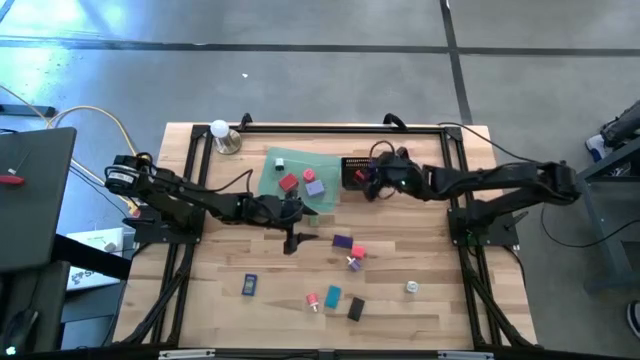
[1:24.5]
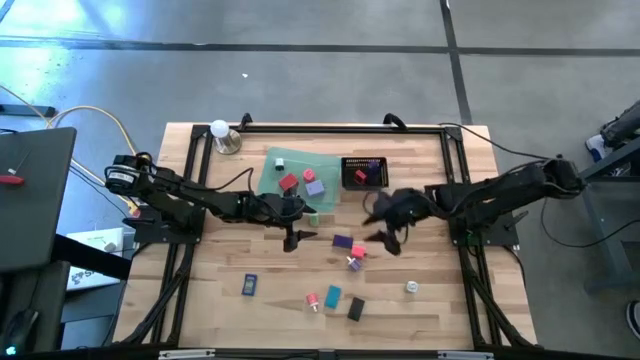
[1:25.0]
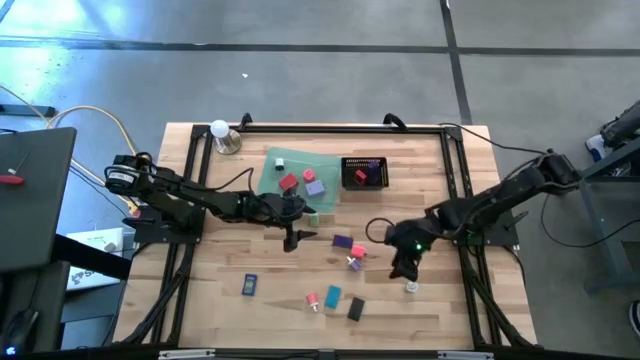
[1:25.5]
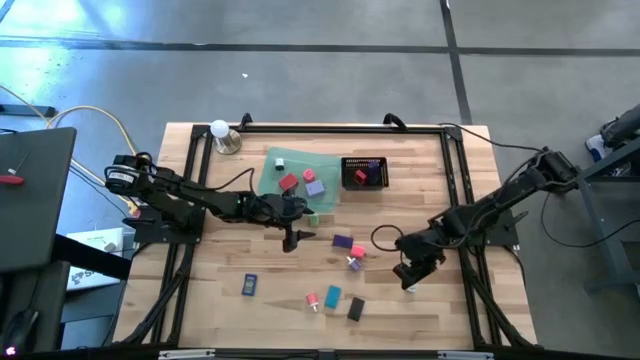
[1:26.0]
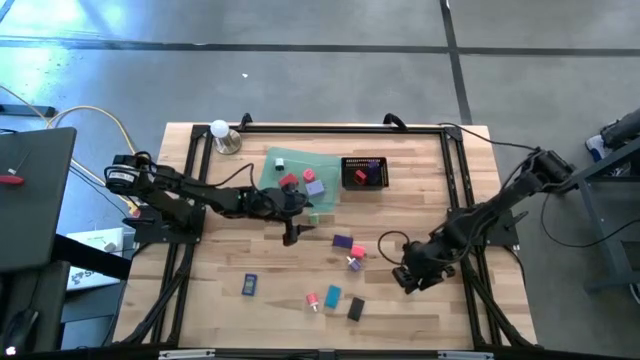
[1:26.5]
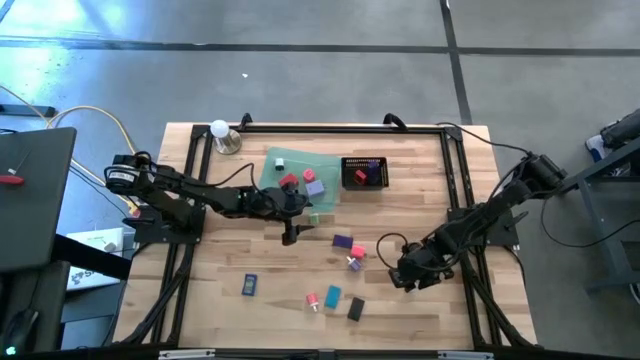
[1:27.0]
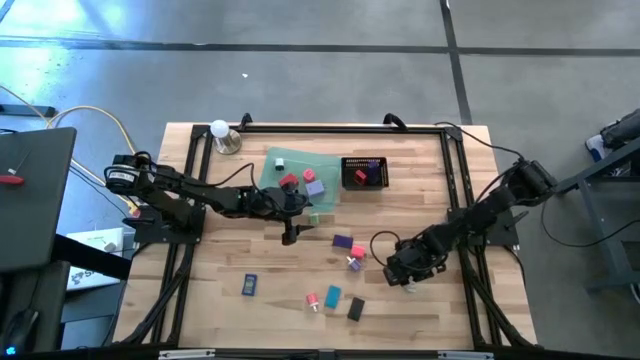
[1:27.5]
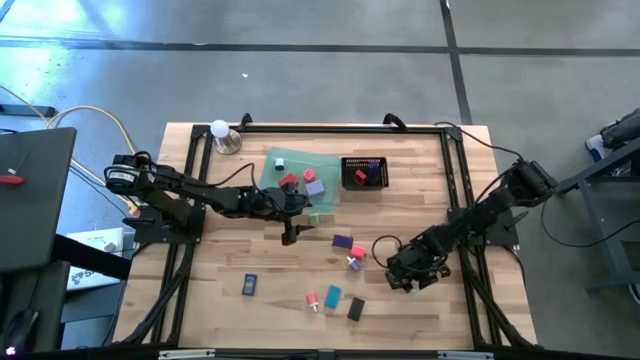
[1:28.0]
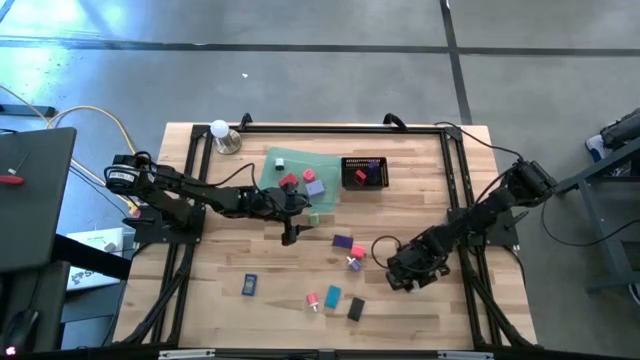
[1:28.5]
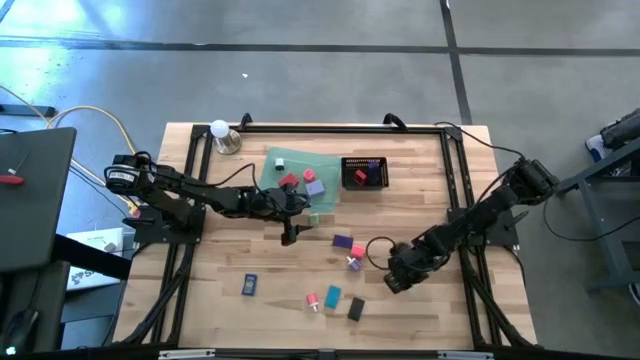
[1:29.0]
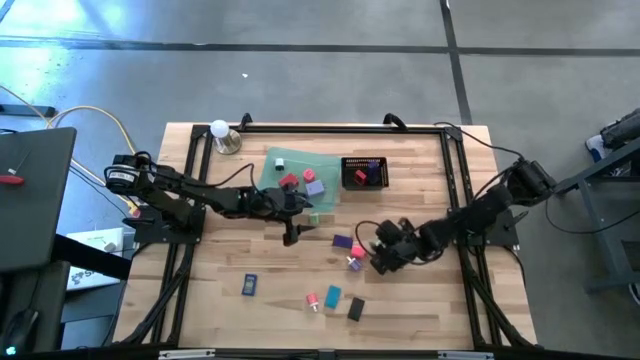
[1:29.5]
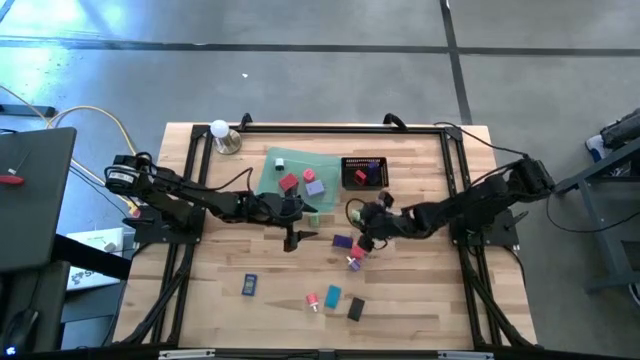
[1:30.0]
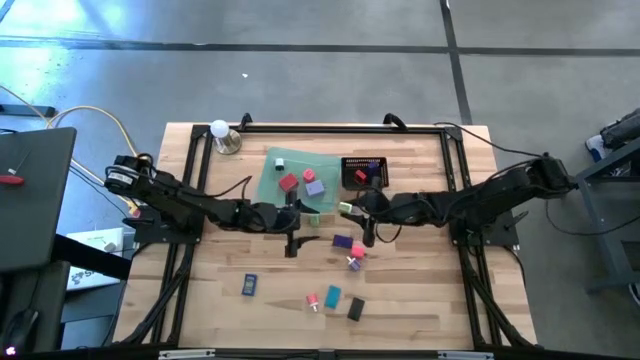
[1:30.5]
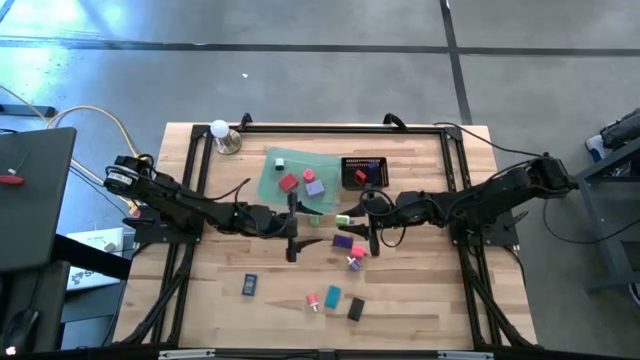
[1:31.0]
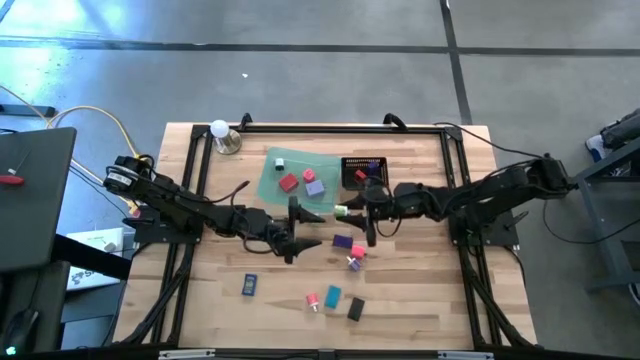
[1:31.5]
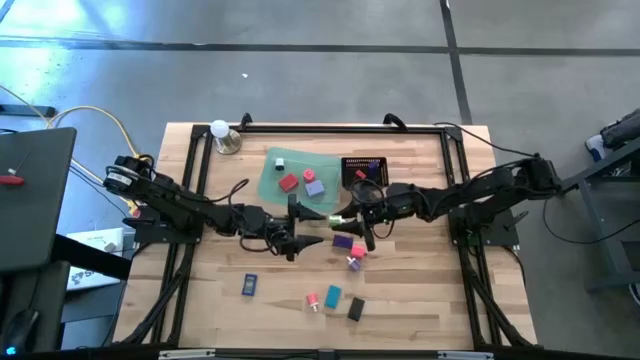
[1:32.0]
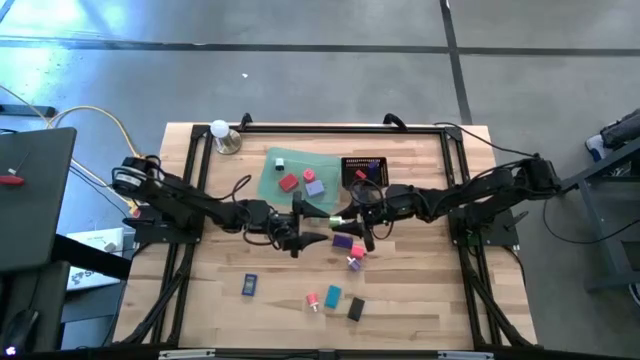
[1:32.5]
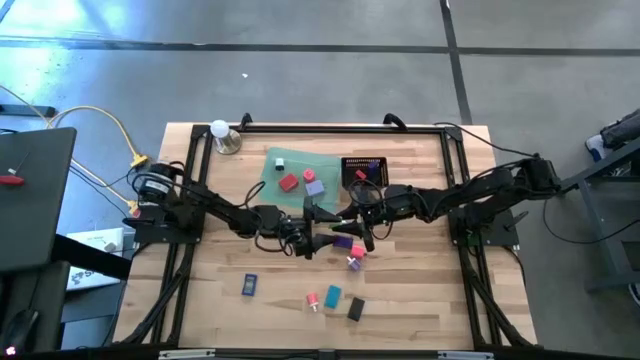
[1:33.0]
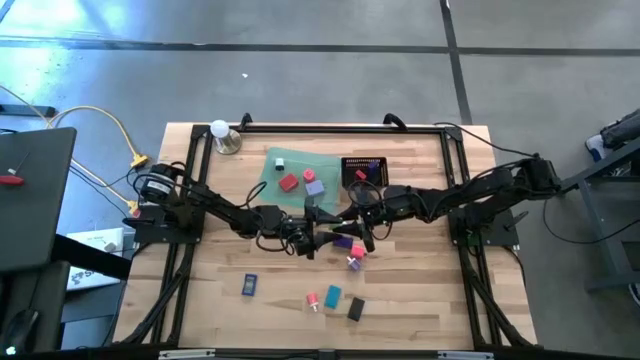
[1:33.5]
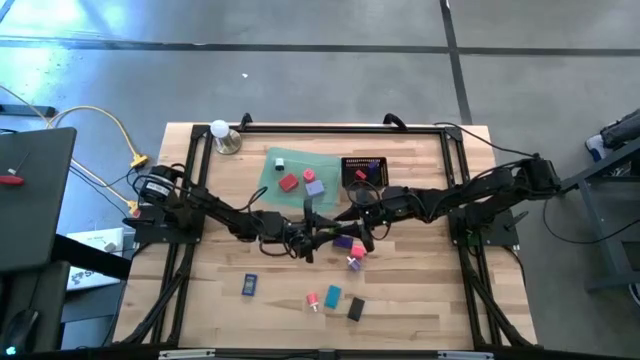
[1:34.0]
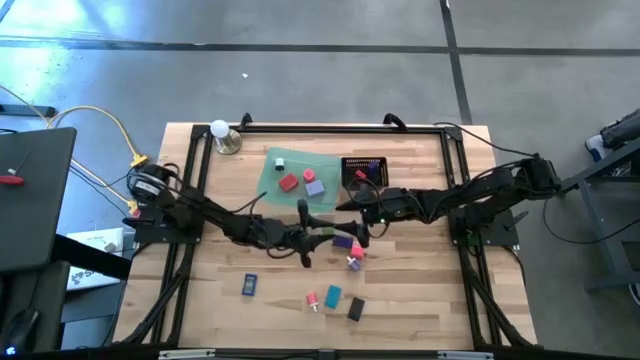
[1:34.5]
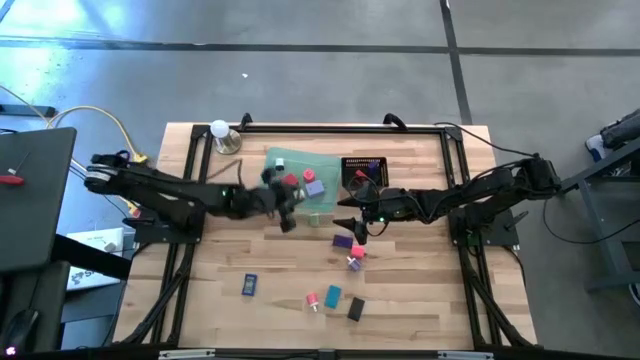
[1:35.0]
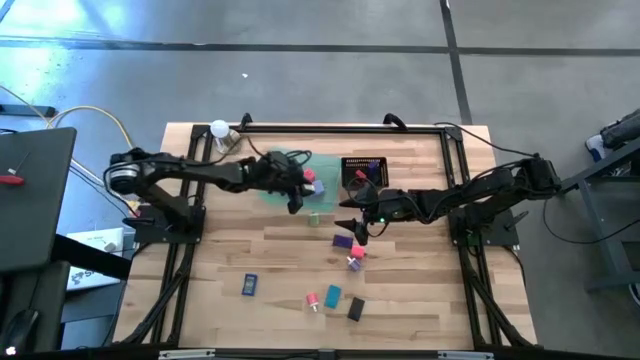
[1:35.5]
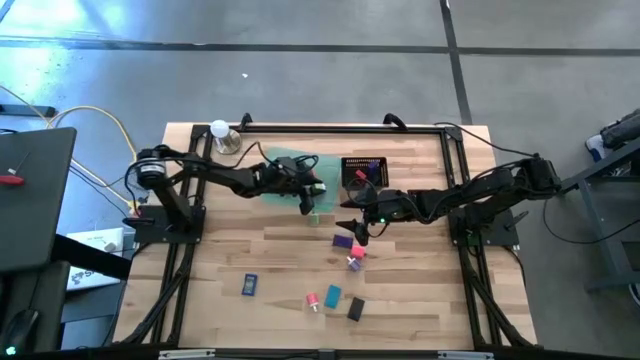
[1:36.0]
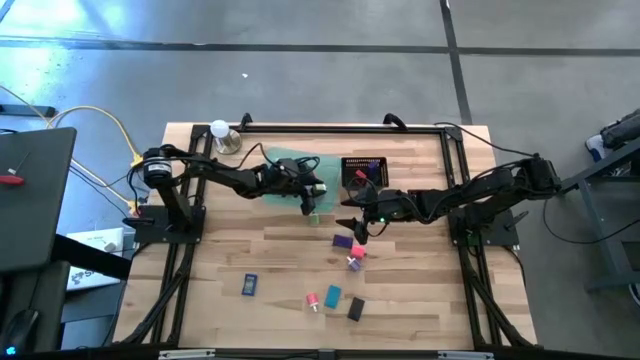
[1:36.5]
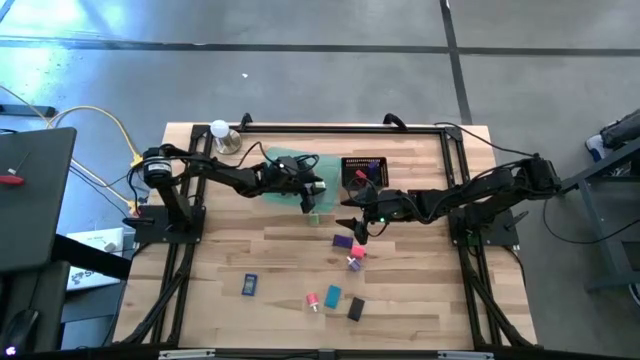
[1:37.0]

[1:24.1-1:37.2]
Task: Pick & Place Office items
Put the right green charger adapter into the green bin

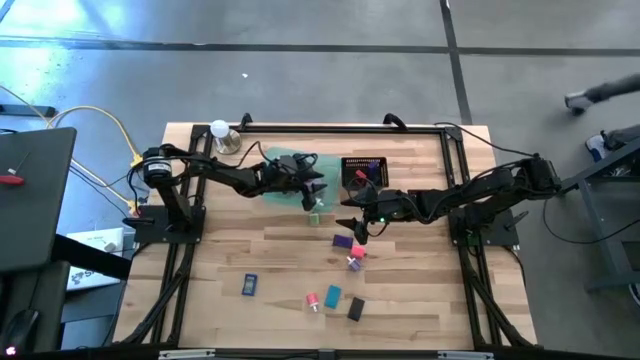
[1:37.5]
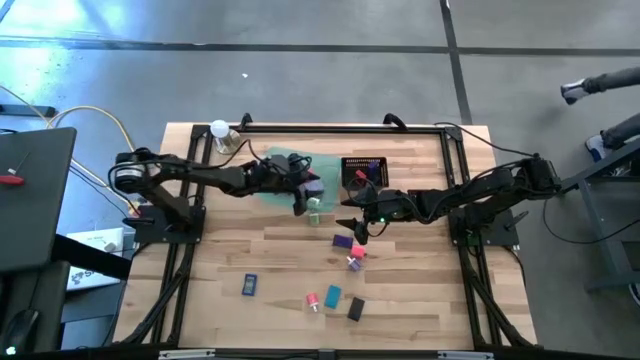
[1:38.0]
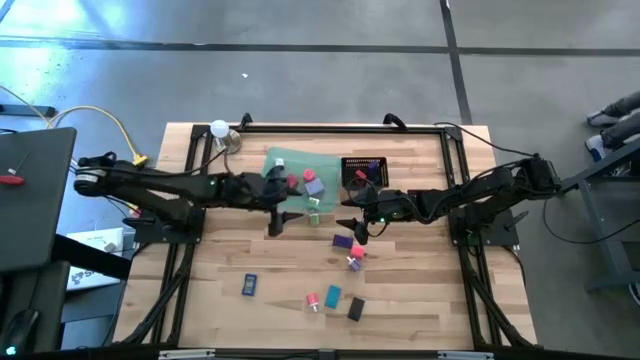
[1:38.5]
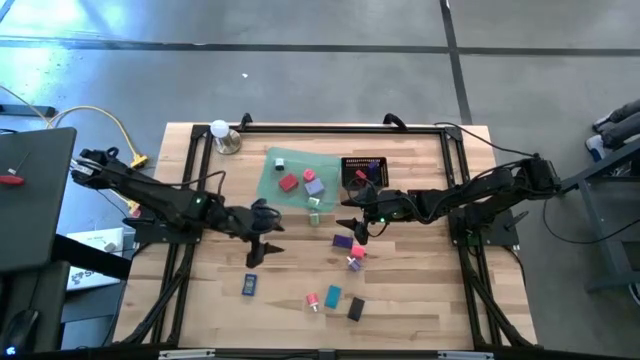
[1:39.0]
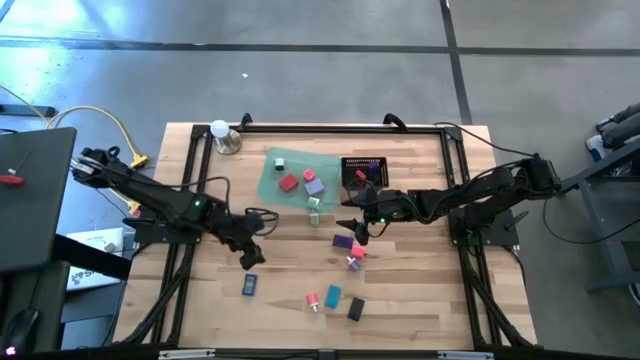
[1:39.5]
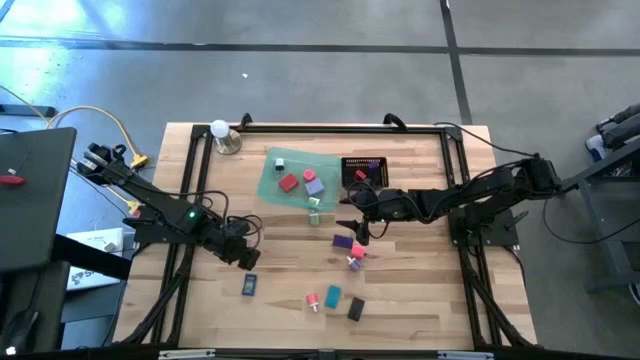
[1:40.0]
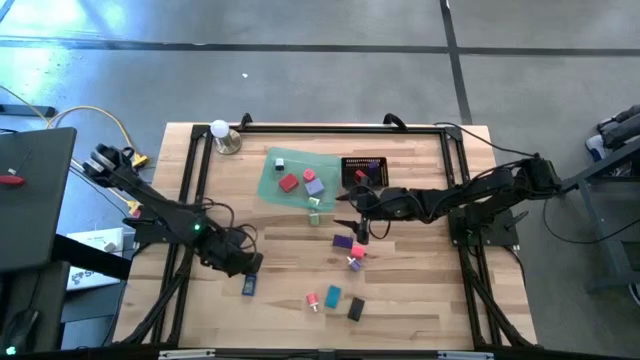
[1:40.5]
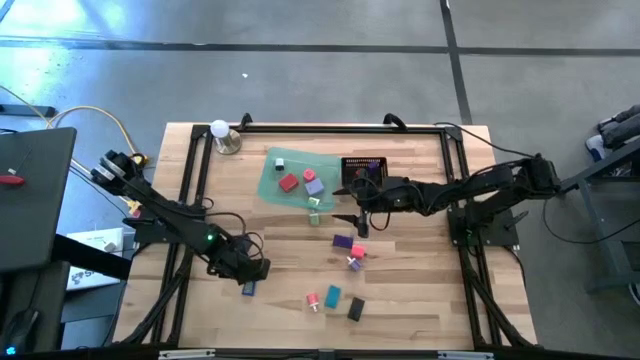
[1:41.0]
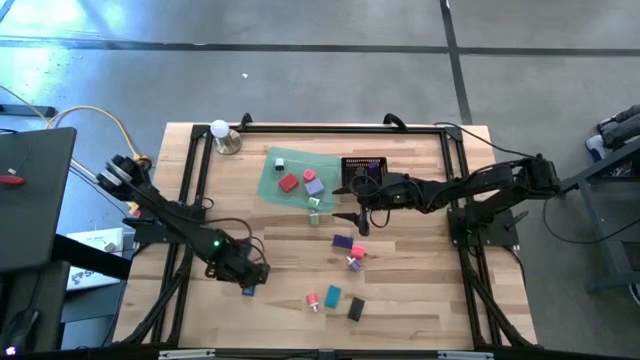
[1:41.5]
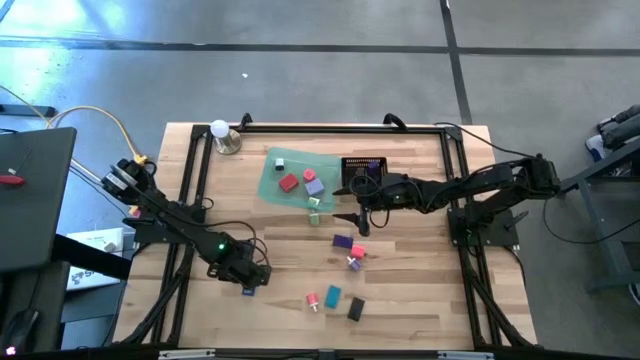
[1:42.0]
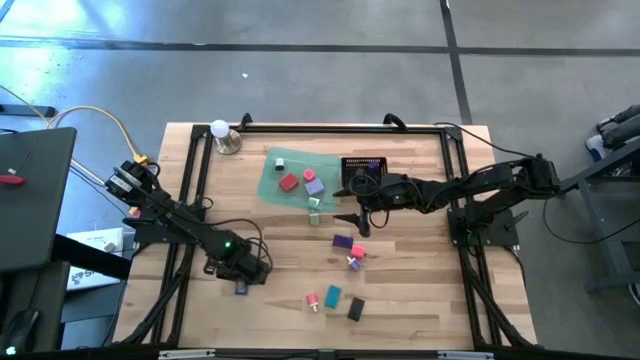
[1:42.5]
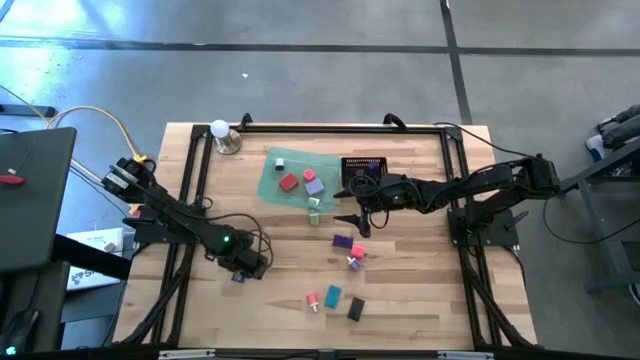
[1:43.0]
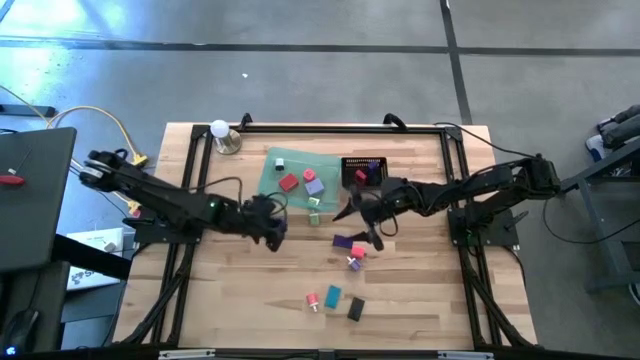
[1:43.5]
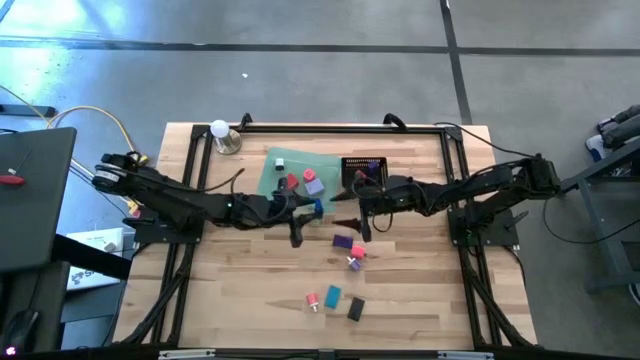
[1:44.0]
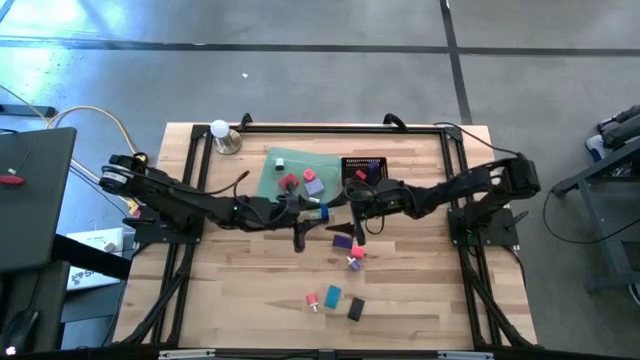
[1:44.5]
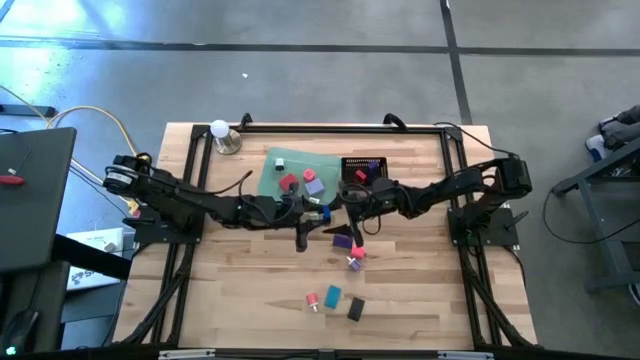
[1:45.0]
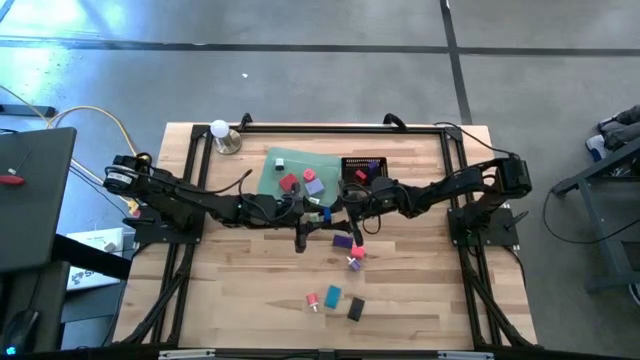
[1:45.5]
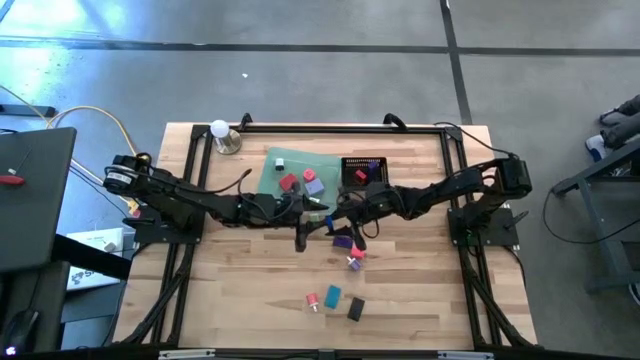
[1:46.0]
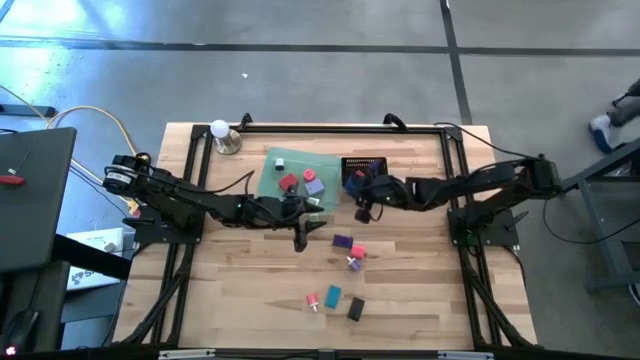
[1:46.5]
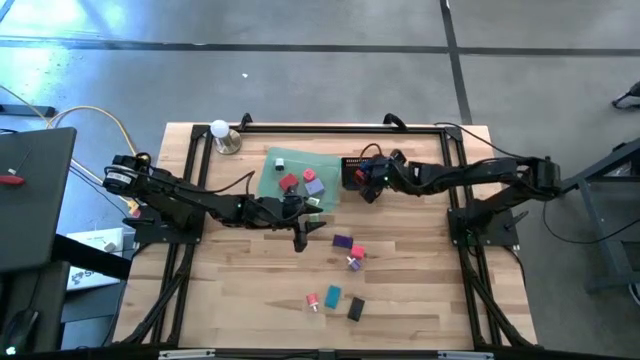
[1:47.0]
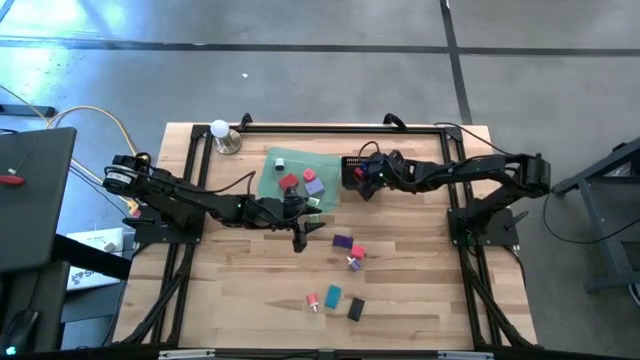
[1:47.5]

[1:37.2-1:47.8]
Put the blue digital timer into the black bin
